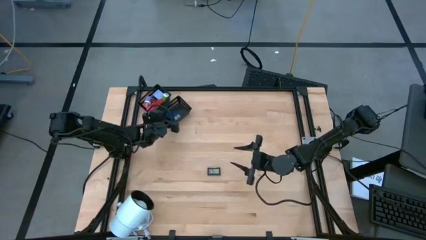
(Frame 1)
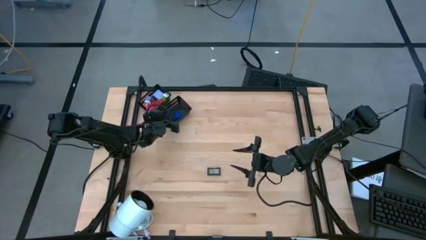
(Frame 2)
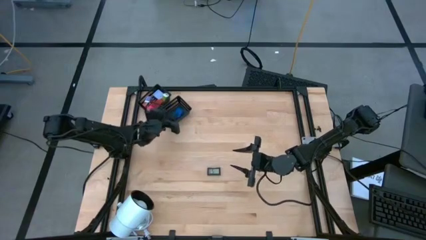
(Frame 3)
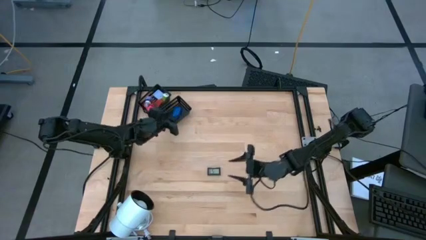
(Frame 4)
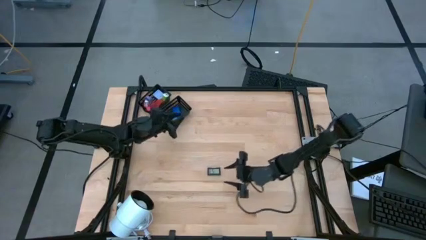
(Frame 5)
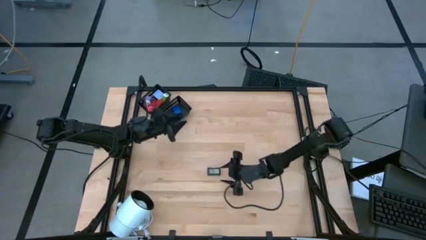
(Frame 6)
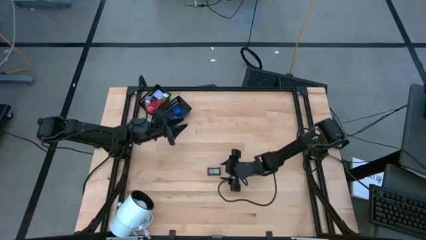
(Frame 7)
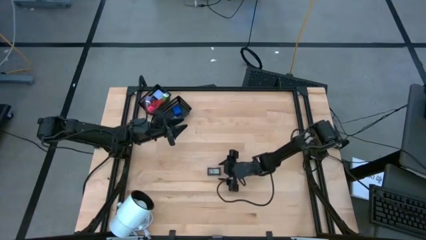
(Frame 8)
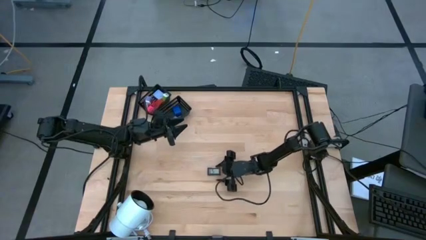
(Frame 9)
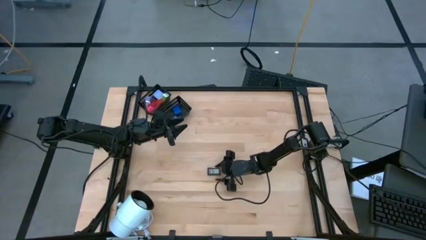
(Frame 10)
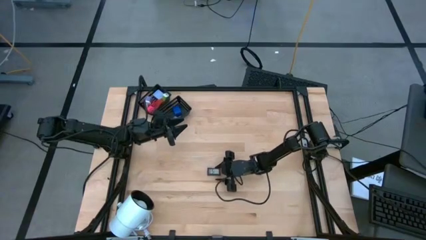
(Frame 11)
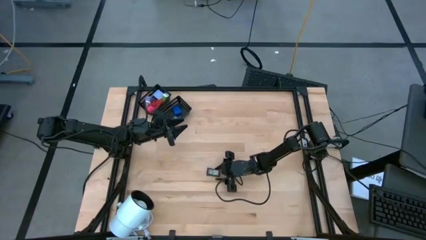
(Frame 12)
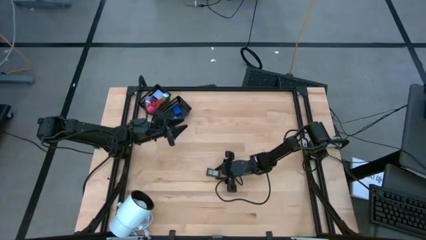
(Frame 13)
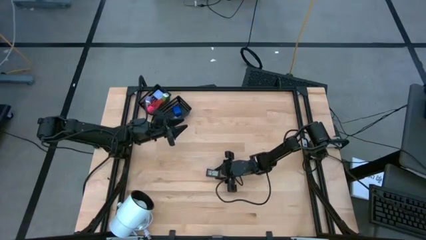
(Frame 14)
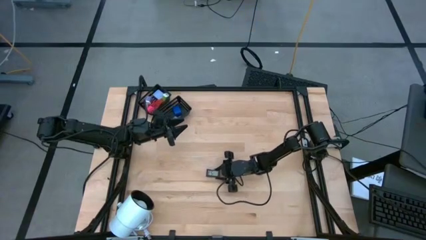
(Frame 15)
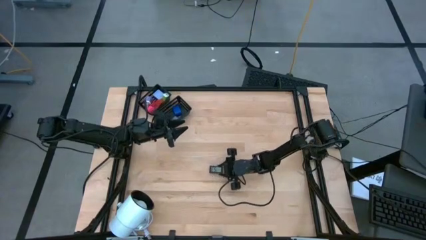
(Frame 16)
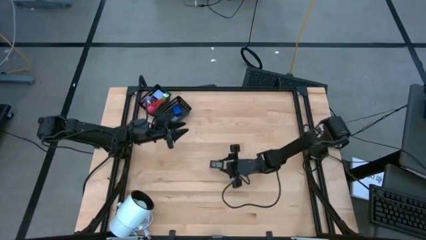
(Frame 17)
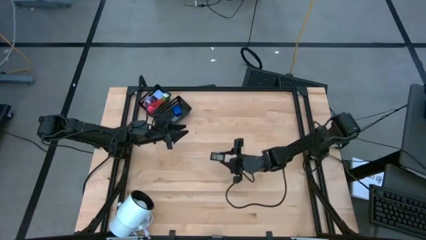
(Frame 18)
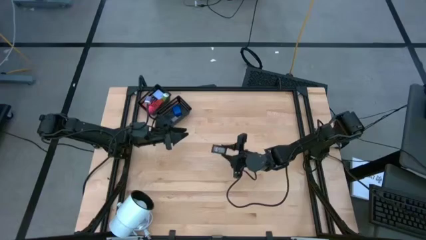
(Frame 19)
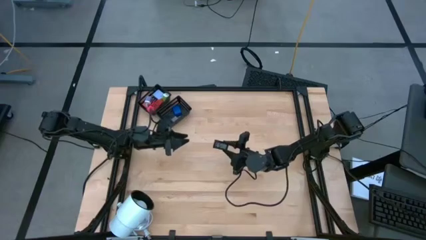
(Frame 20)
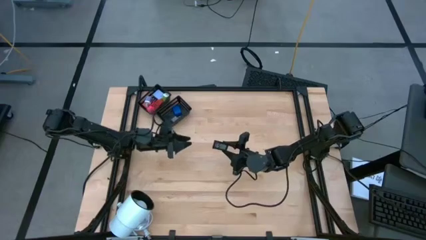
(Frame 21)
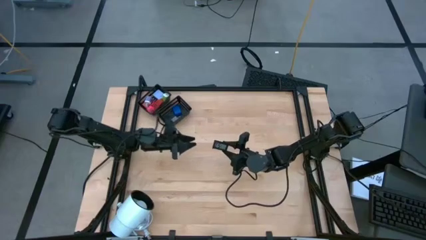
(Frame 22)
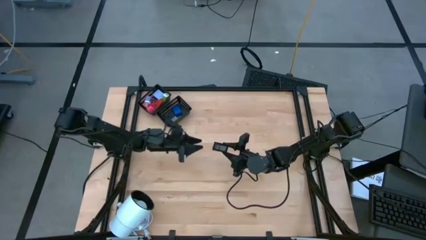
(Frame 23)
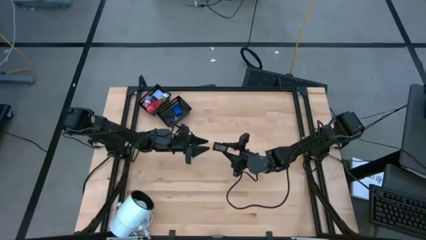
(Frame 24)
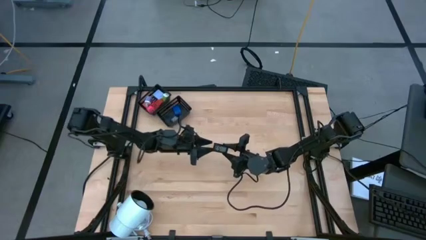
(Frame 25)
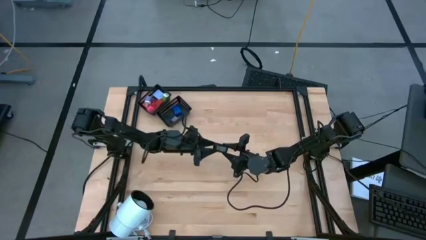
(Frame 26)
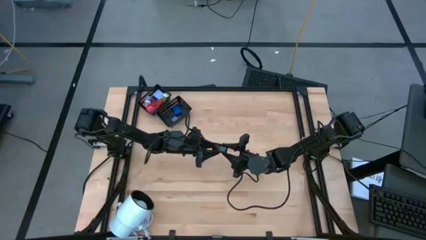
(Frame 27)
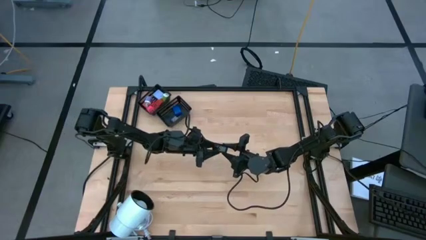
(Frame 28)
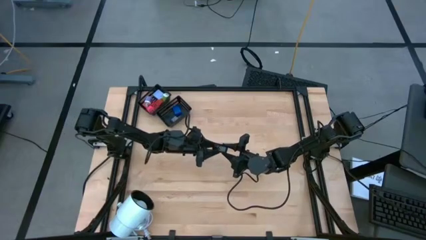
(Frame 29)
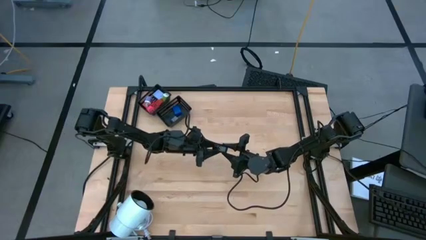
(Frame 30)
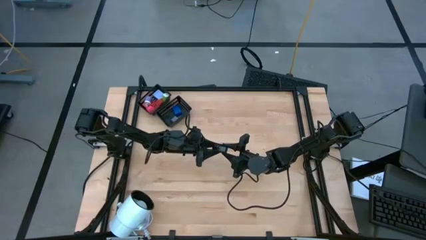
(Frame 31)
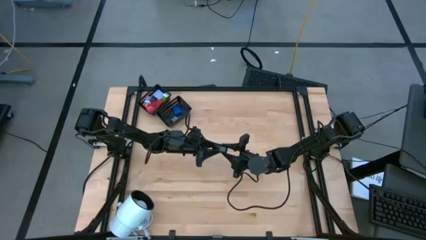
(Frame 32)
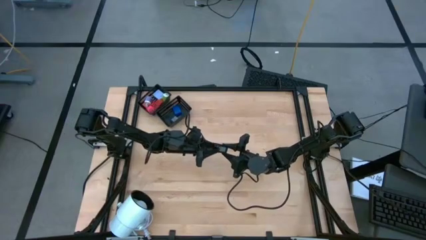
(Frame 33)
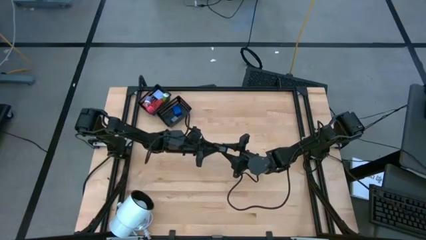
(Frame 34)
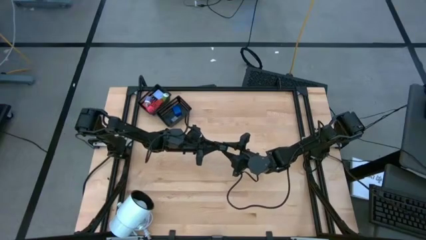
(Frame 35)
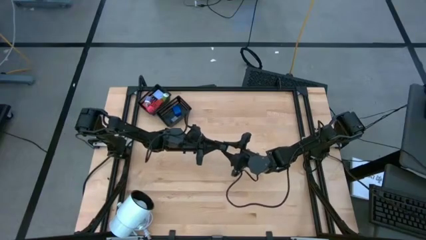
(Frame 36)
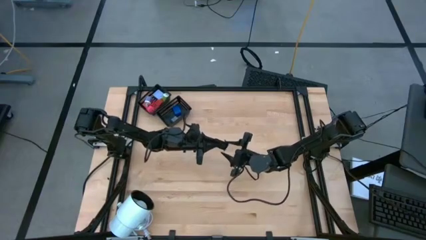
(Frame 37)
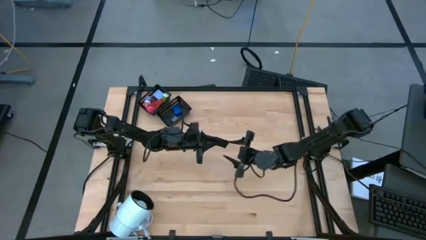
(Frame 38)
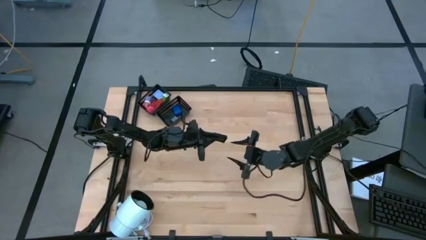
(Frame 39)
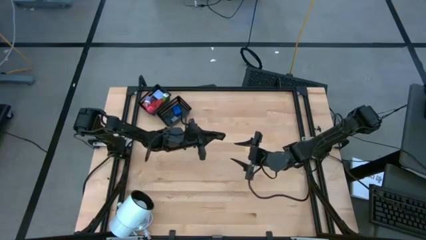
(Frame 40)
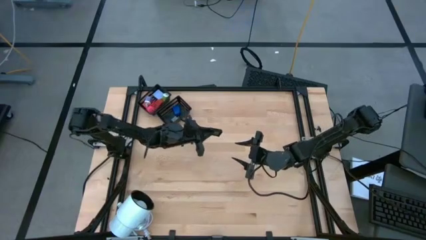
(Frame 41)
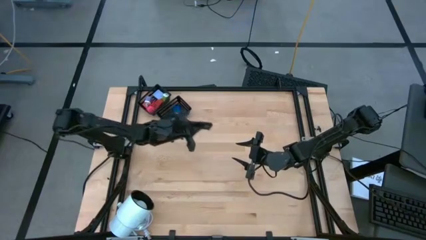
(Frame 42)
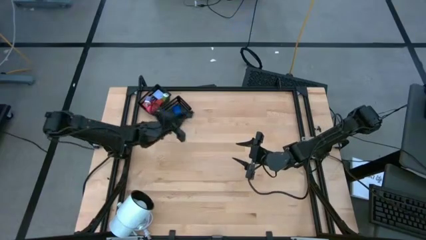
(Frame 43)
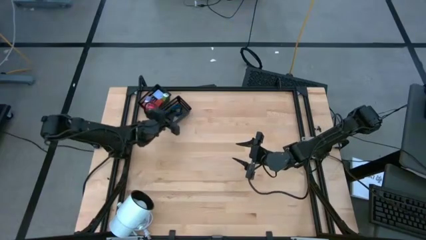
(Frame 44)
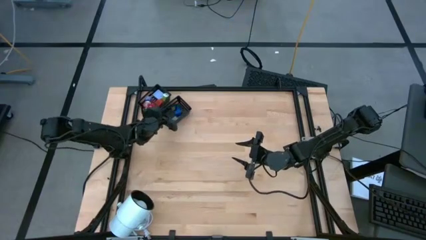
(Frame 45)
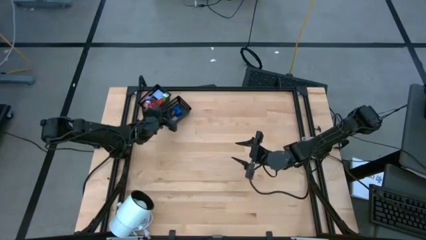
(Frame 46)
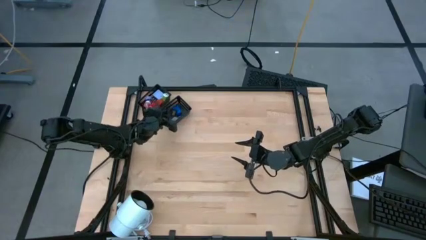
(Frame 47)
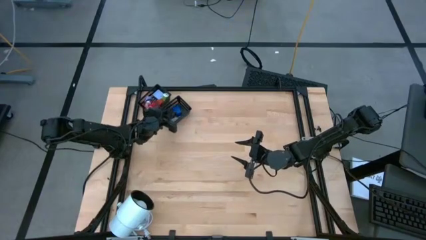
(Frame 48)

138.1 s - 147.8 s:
Task: Pick & Place Office items
Put the black timer into the bottom black bin

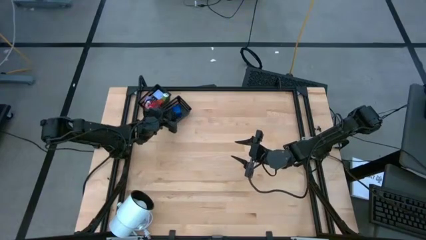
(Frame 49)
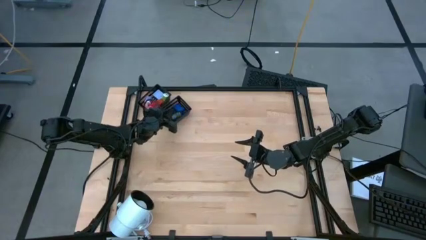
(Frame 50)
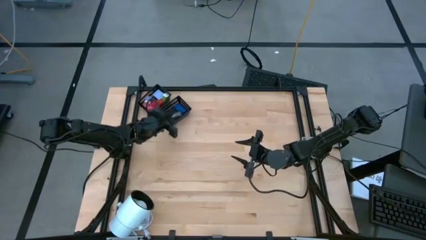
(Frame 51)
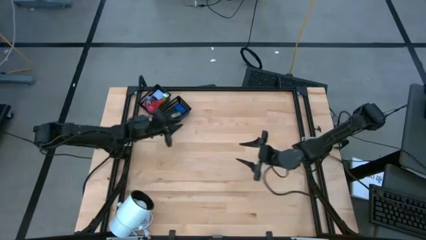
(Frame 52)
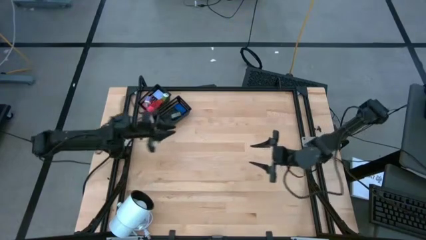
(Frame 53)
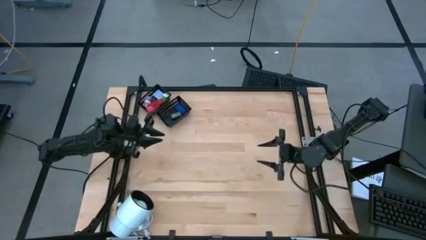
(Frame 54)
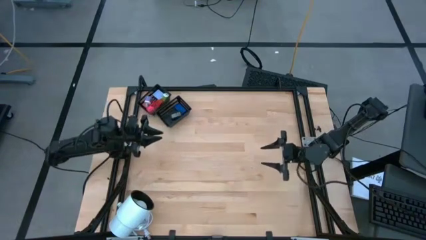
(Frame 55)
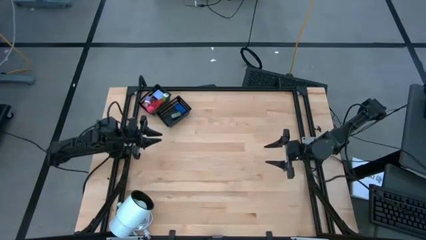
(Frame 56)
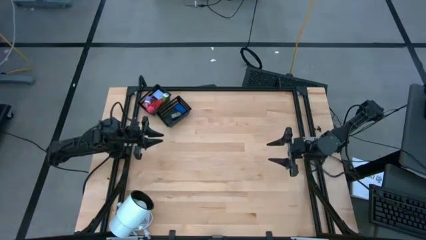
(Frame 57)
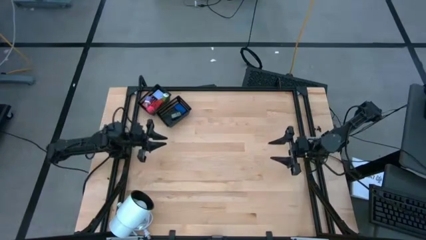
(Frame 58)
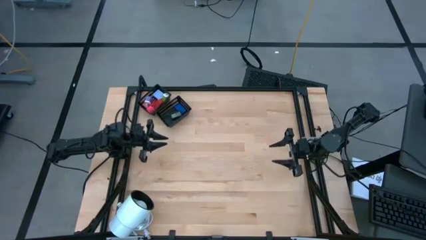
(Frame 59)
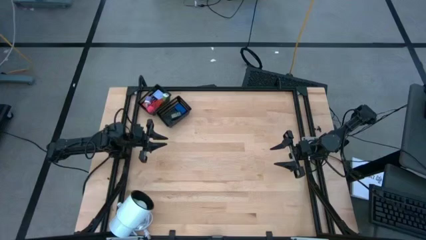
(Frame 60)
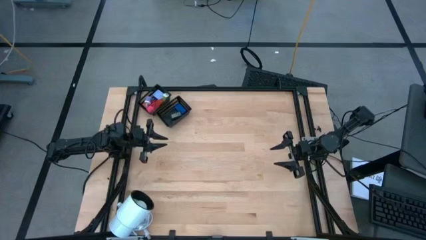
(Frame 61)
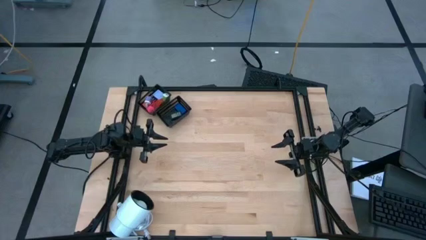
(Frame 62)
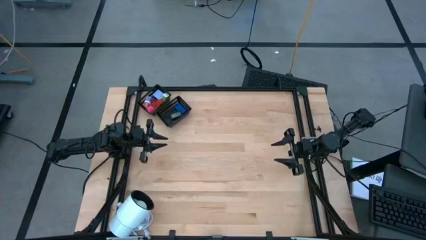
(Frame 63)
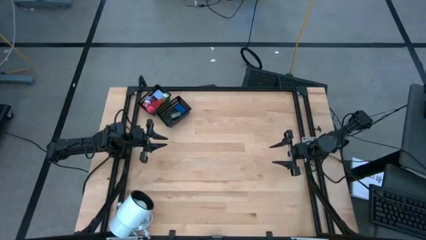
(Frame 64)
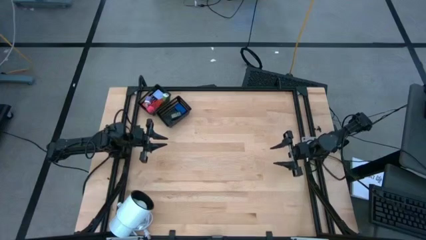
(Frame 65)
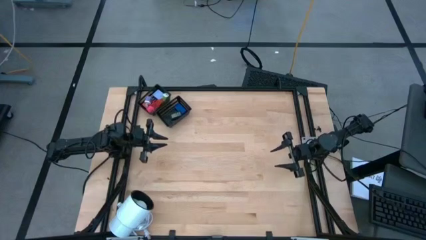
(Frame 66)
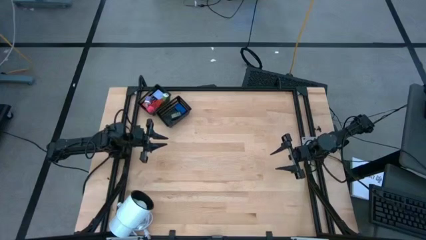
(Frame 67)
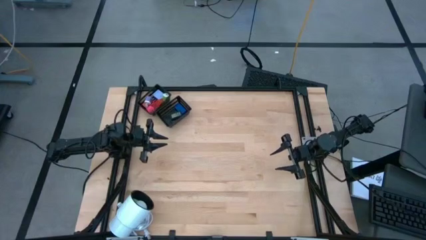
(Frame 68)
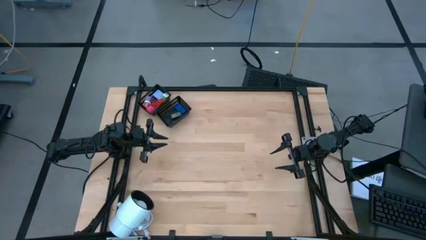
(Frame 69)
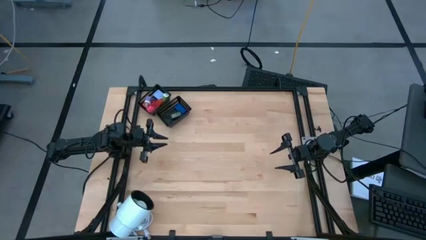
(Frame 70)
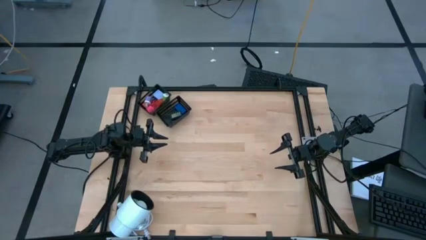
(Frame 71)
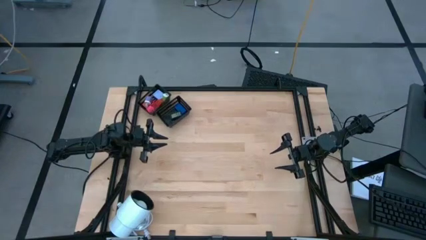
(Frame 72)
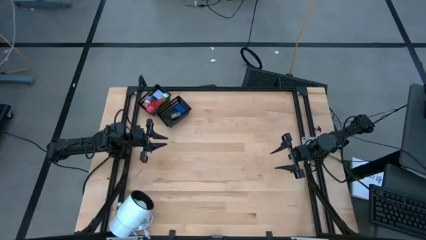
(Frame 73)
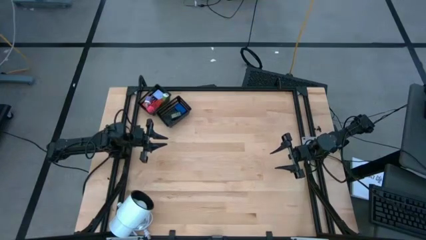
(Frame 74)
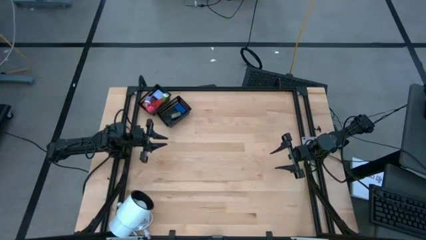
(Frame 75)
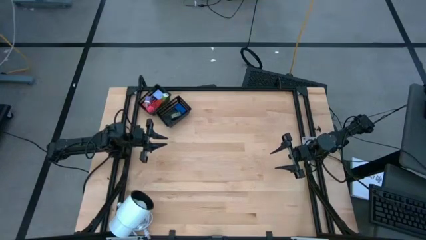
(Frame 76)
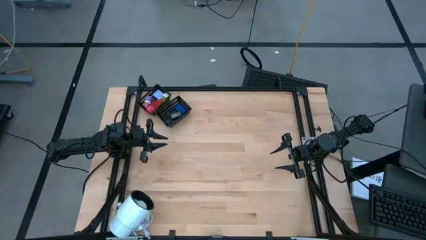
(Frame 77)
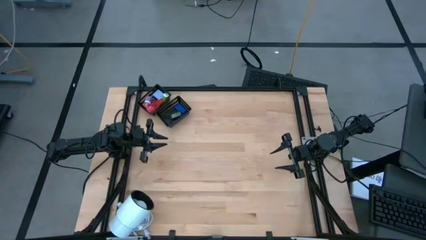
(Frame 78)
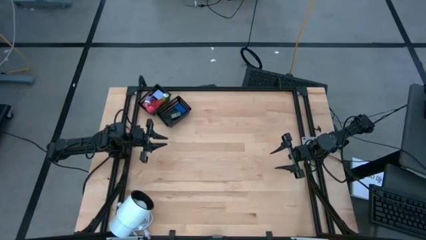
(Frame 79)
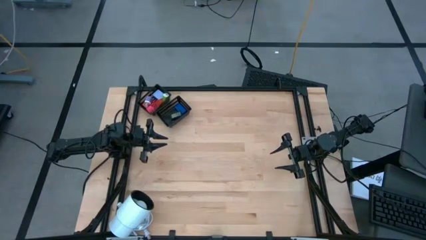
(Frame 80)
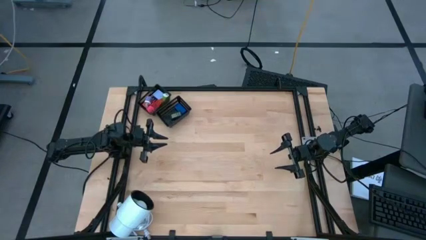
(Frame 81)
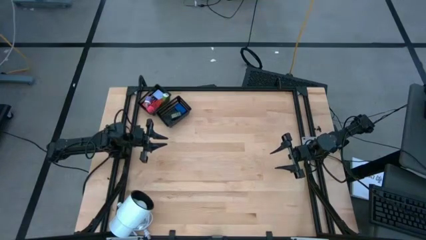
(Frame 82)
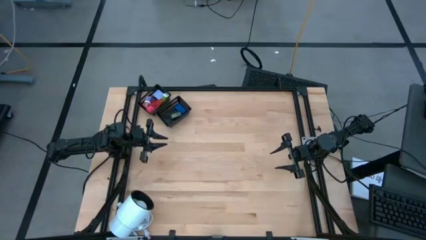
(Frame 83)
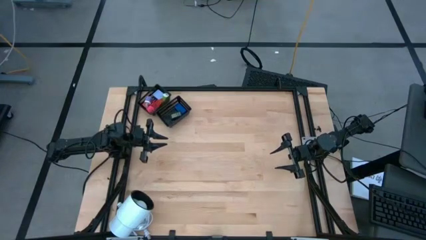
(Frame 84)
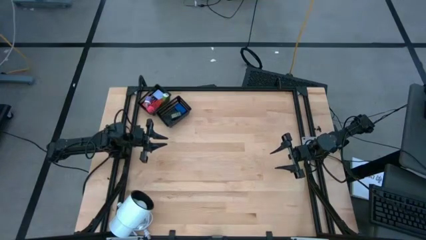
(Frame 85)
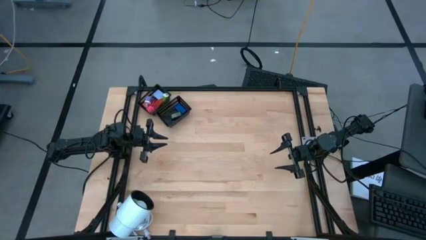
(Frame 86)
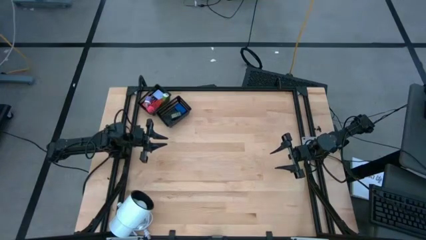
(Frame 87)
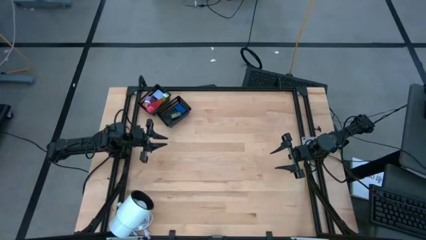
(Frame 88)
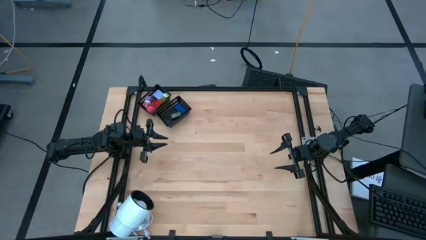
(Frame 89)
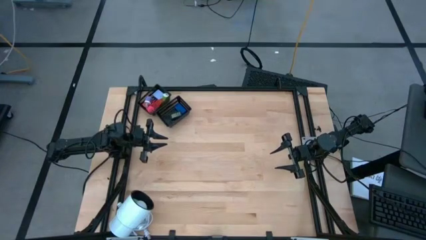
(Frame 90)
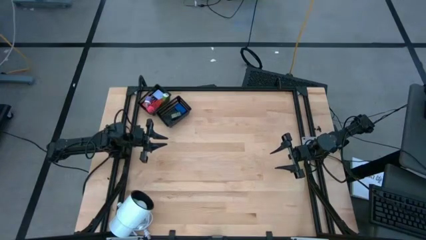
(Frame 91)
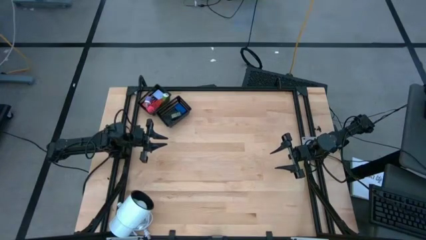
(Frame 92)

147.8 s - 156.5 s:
Return to Home Position
